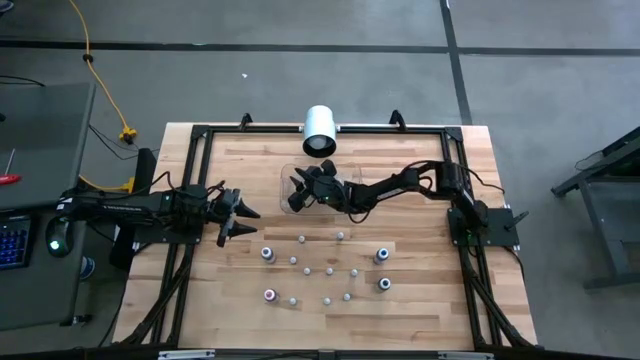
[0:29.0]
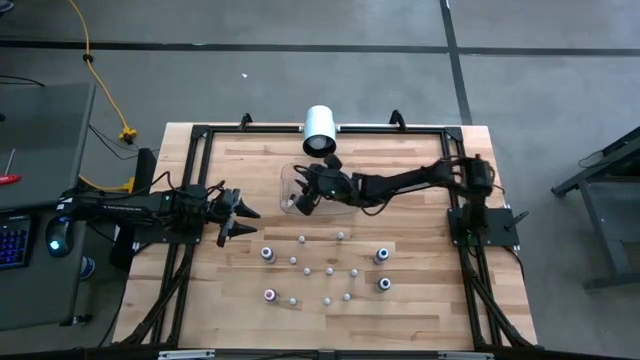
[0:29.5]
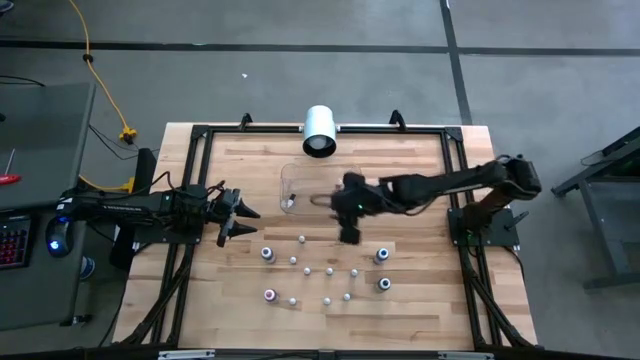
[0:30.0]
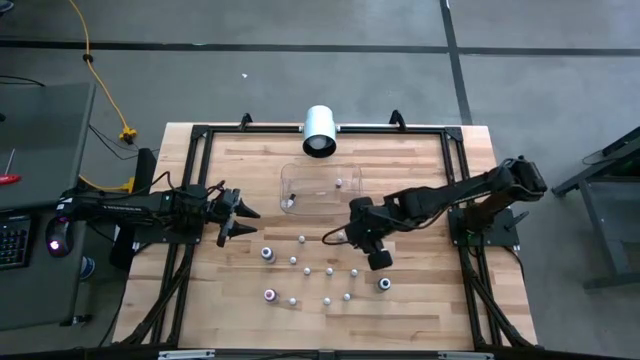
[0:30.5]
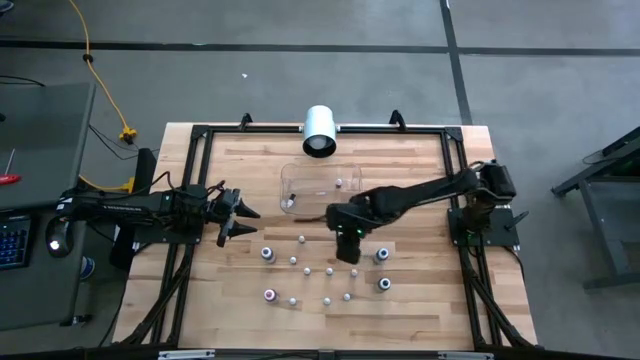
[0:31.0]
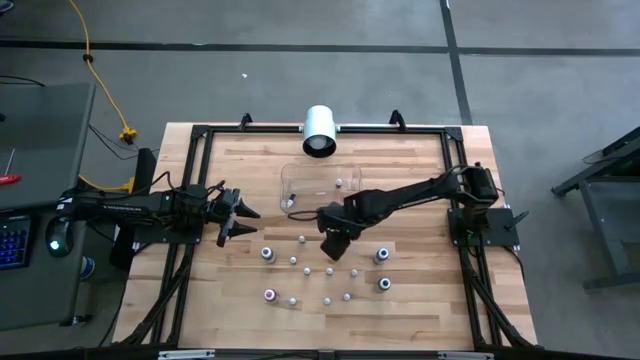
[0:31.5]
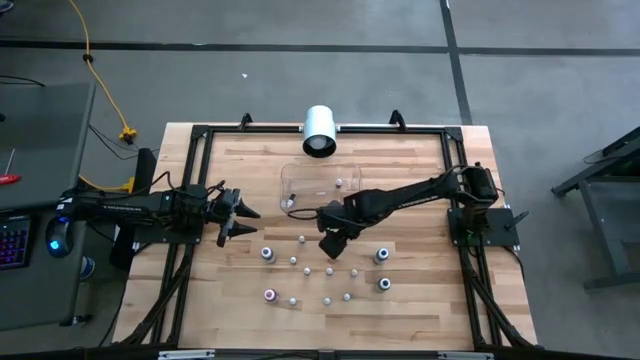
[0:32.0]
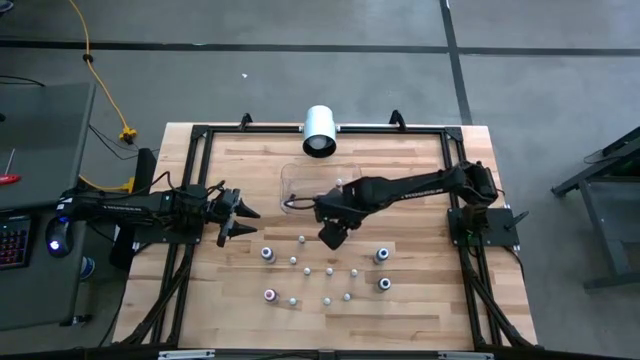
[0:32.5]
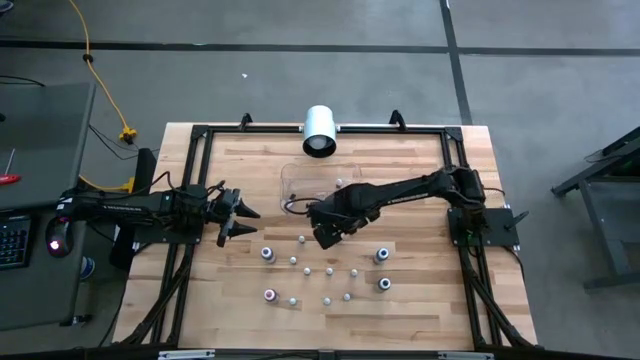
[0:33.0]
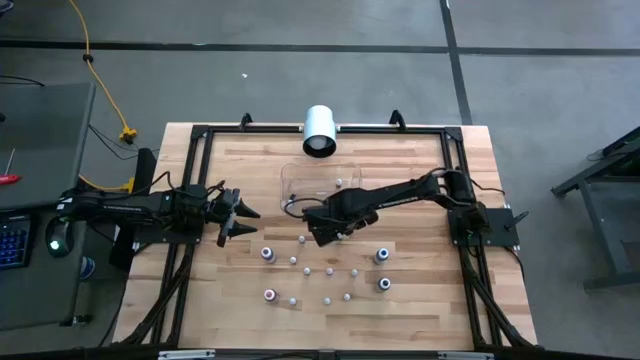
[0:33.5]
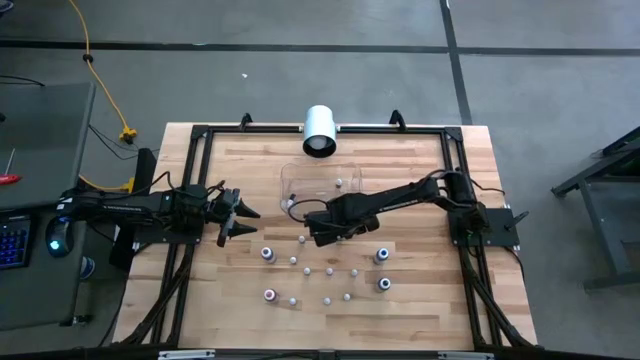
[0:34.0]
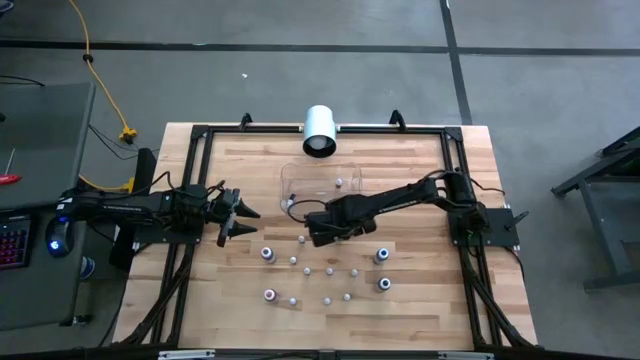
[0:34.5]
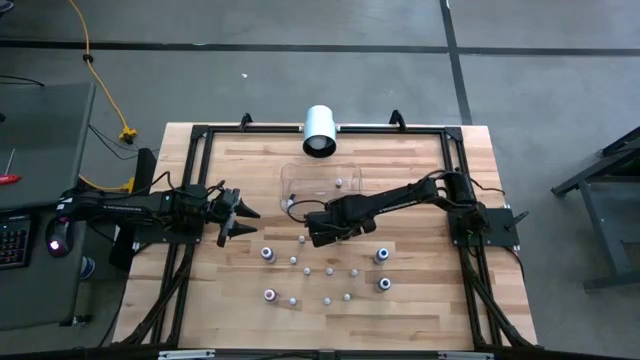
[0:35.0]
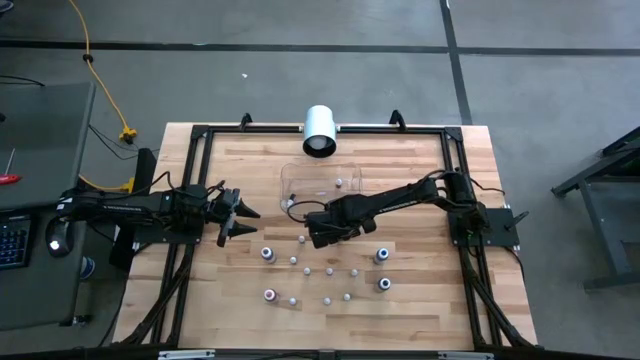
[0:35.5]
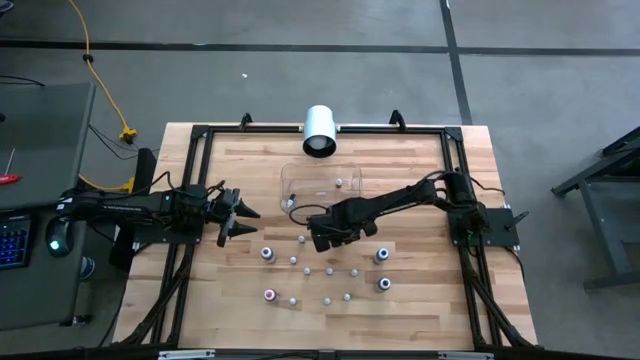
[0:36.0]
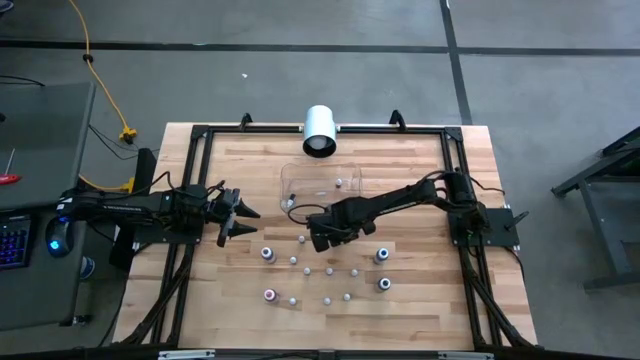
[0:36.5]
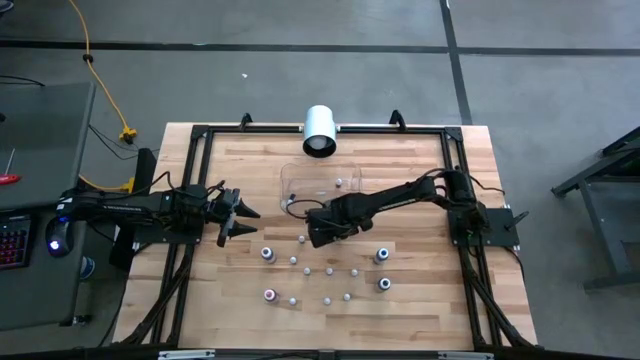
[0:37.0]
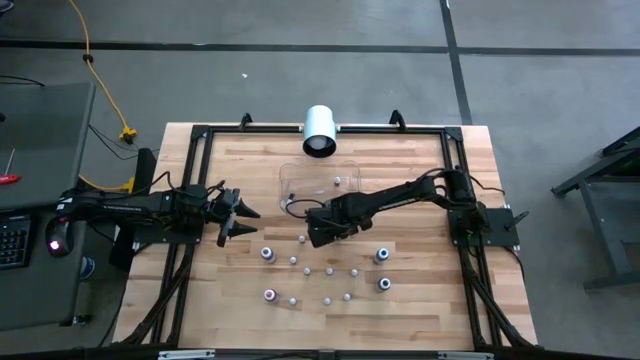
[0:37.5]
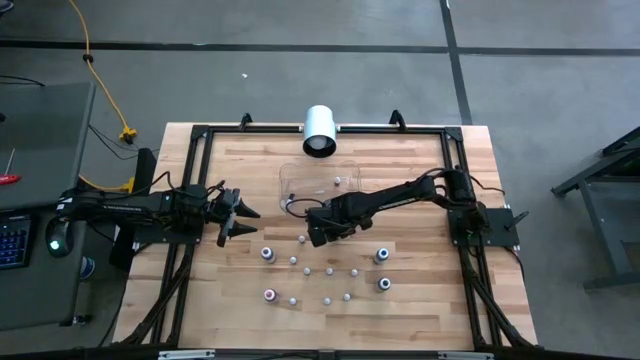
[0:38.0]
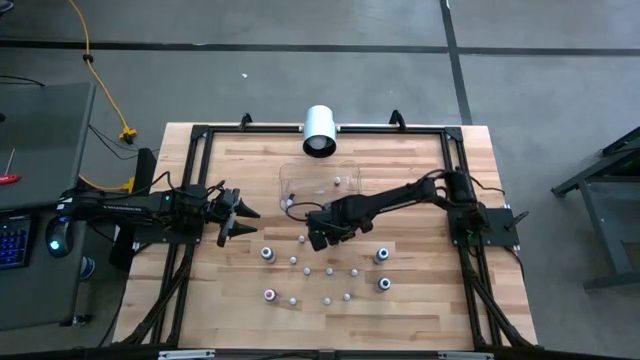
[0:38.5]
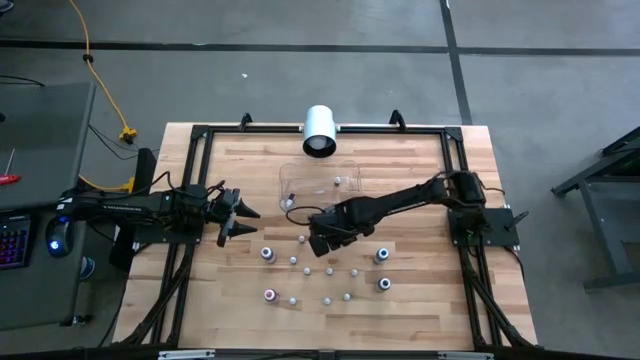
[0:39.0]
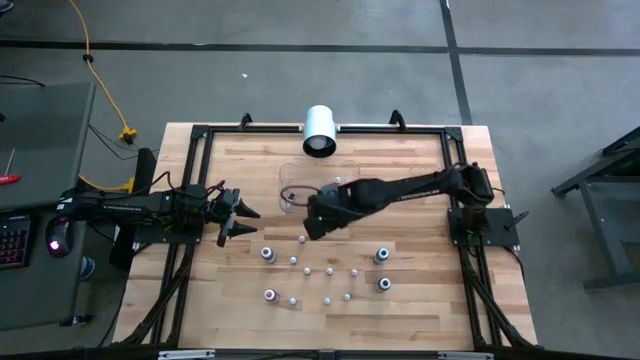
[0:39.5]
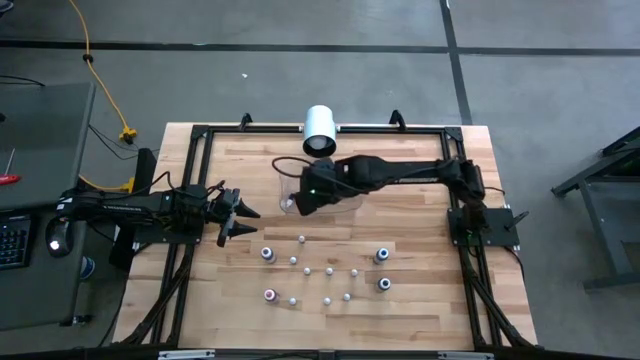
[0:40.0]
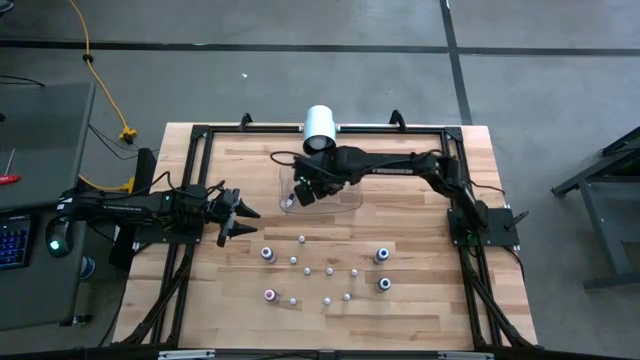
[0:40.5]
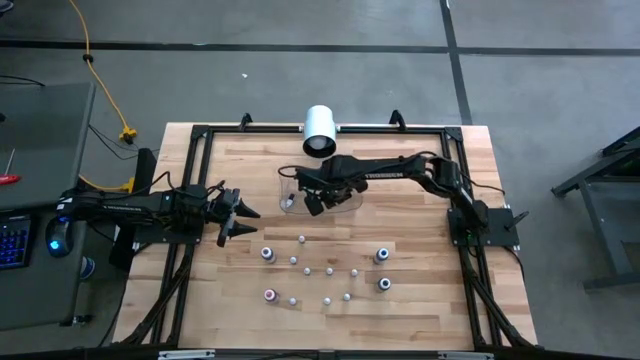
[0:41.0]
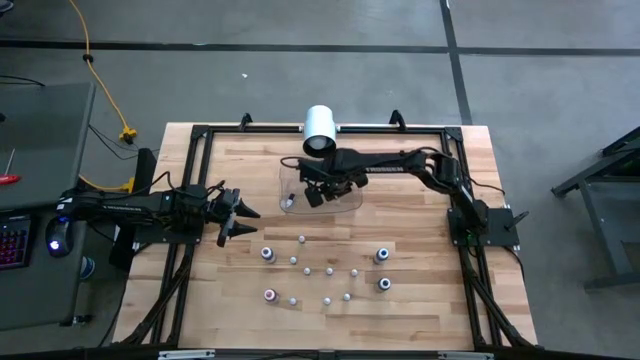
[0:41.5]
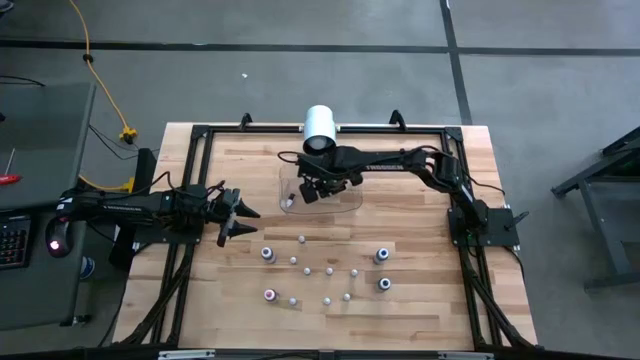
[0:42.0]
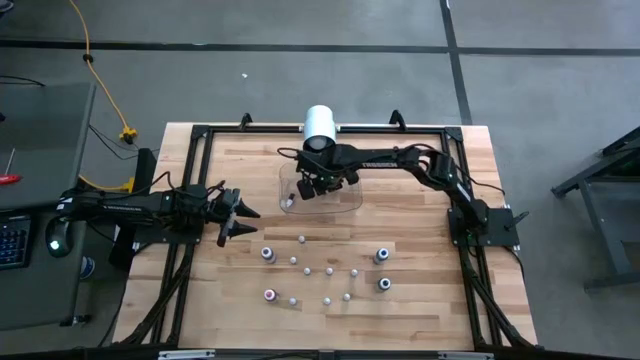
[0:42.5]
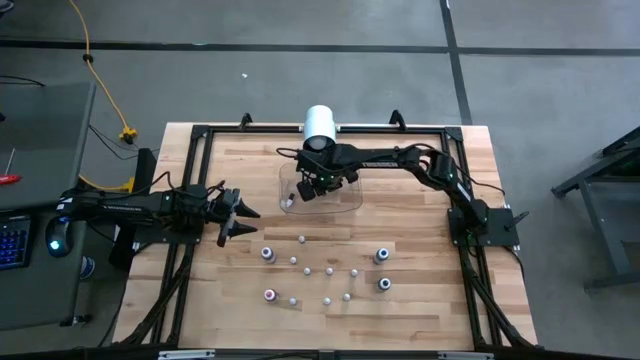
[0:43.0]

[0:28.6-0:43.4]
Task: Pick & Place food coloring
Put the small red food coloring bottle into the transparent bin

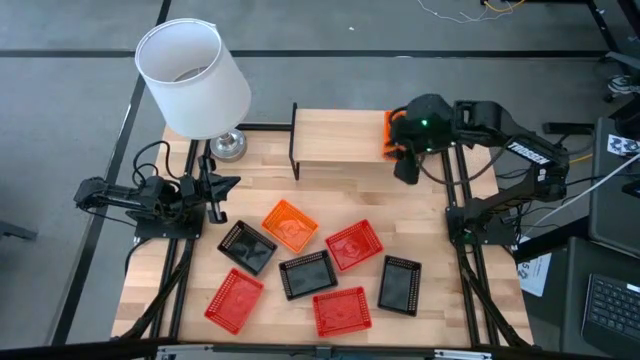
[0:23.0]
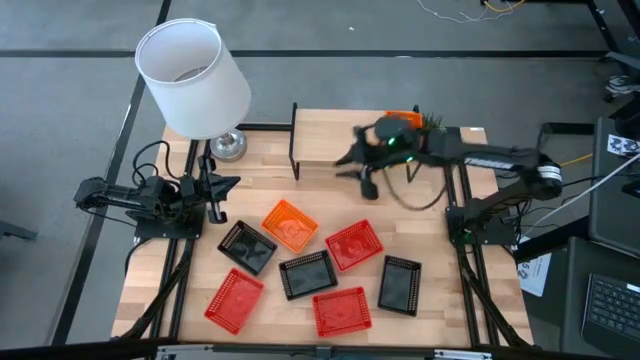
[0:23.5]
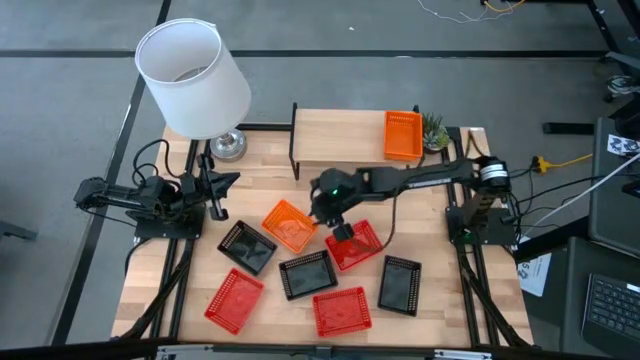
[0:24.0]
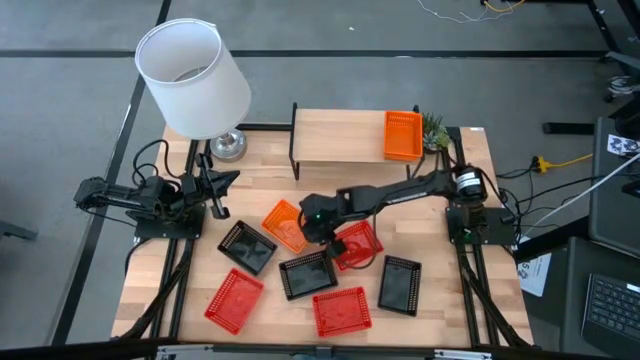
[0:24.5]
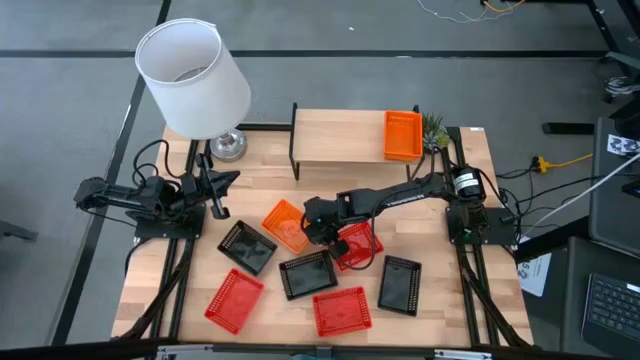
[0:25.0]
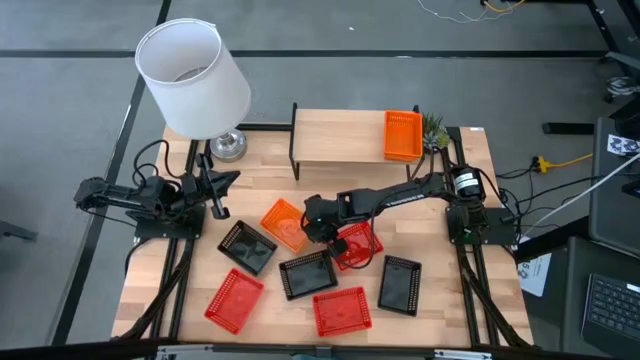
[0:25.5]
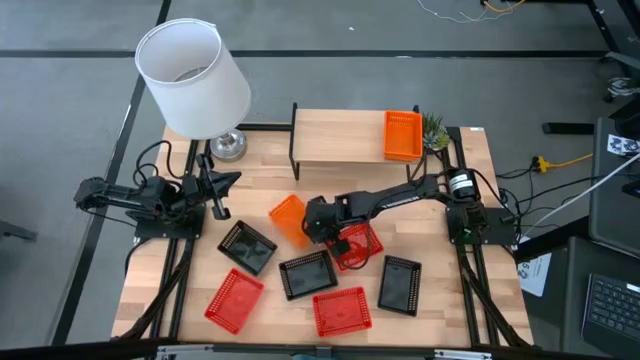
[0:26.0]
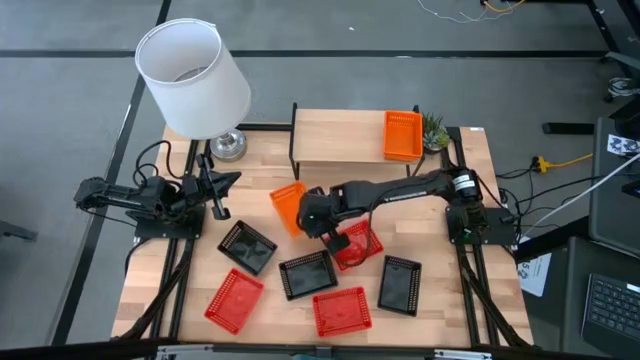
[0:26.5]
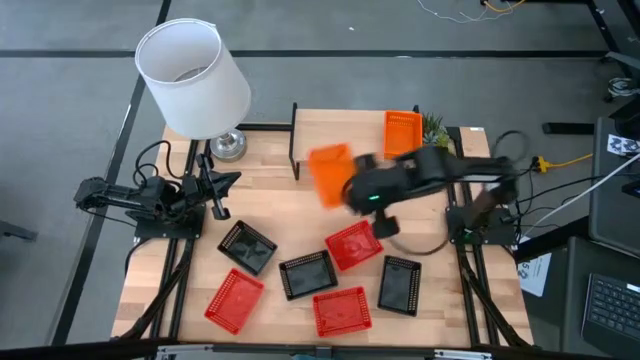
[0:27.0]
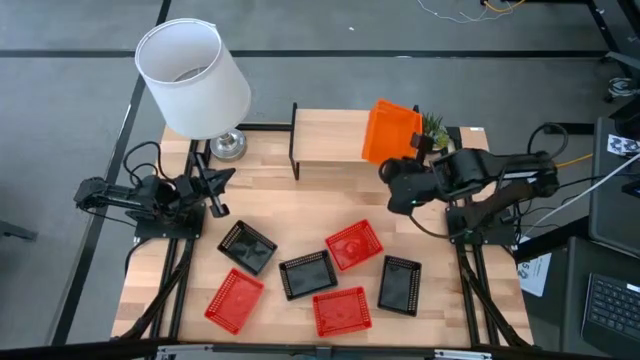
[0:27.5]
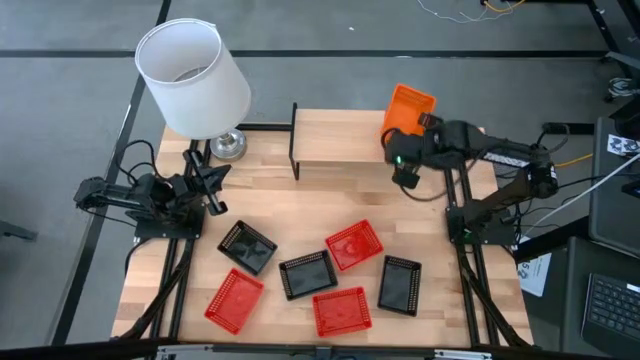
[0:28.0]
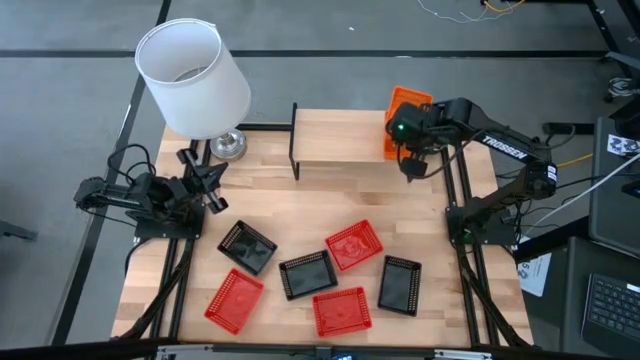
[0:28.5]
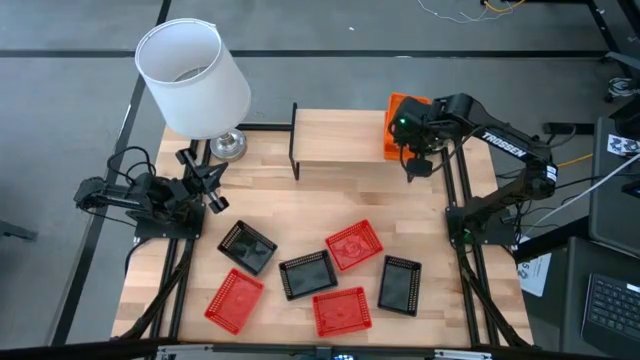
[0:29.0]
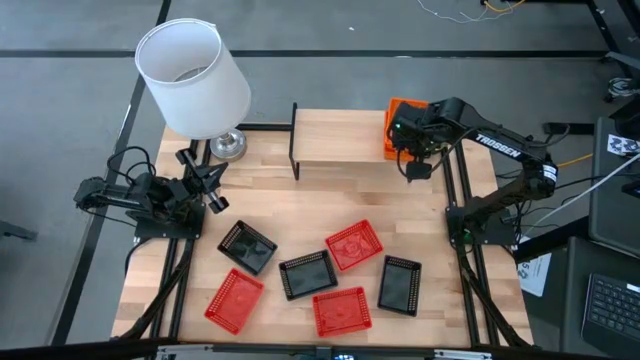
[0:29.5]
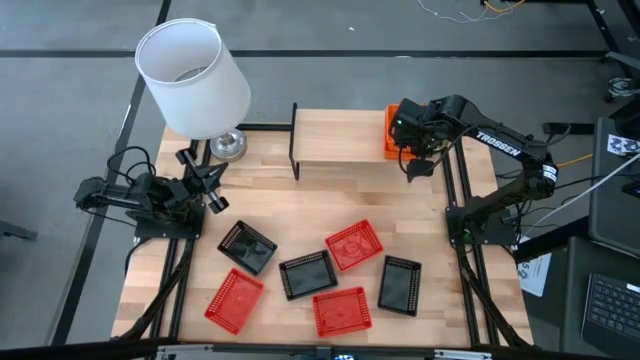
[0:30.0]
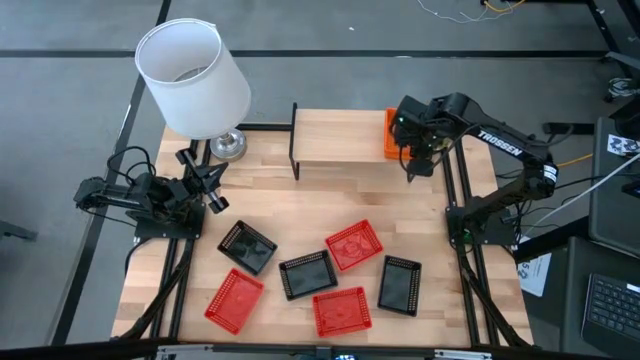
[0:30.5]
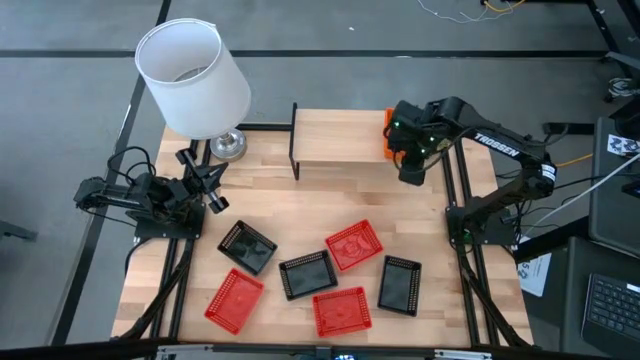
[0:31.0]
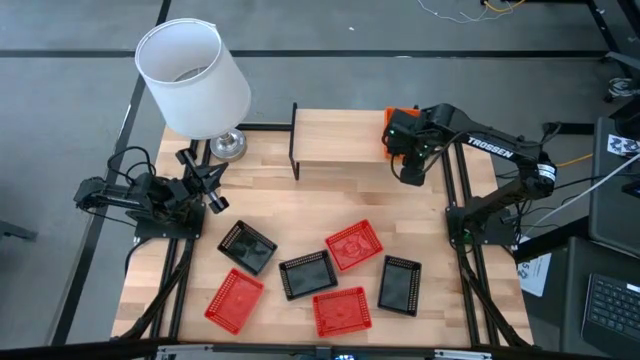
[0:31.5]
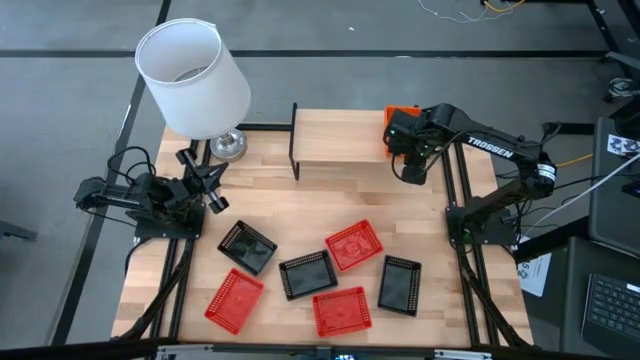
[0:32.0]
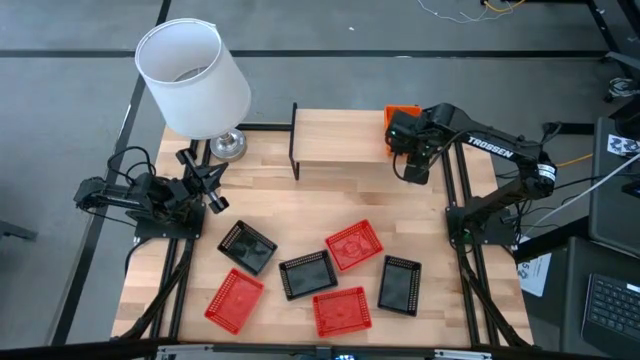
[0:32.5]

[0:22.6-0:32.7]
Task: Stack baskets on shelf by color
Stack the orange bin on the other orange bins on the shelf
